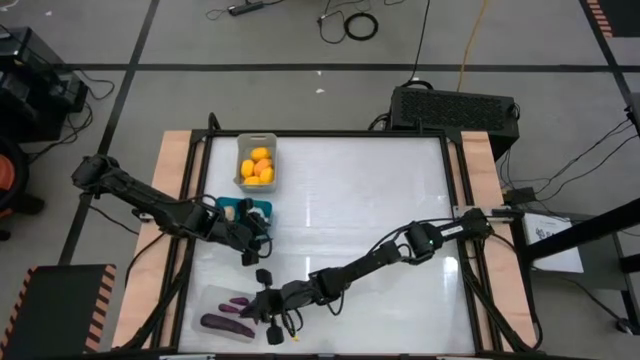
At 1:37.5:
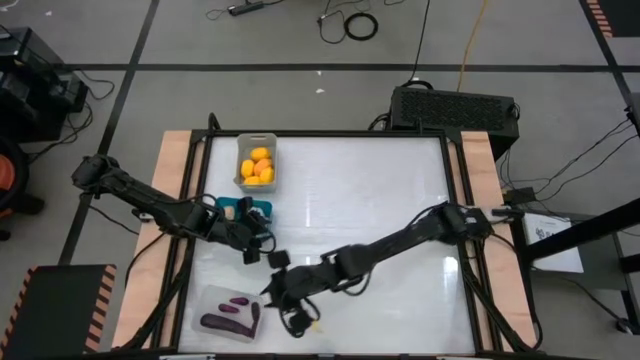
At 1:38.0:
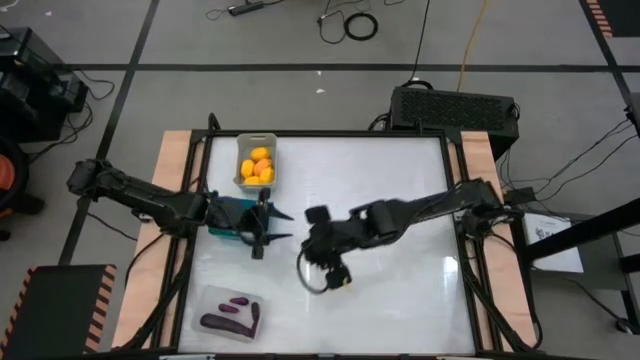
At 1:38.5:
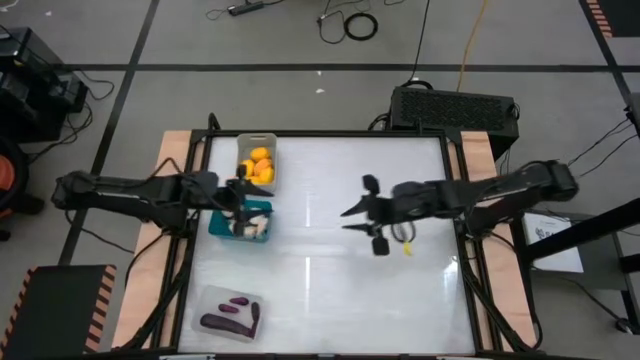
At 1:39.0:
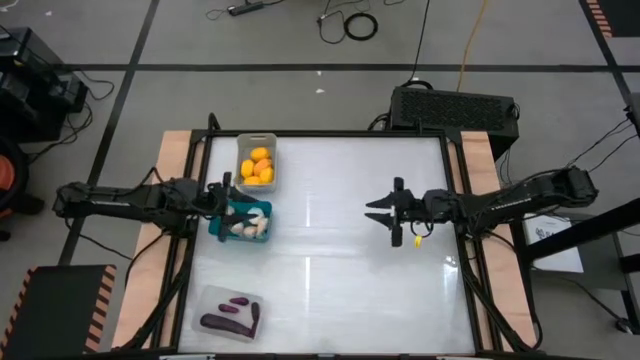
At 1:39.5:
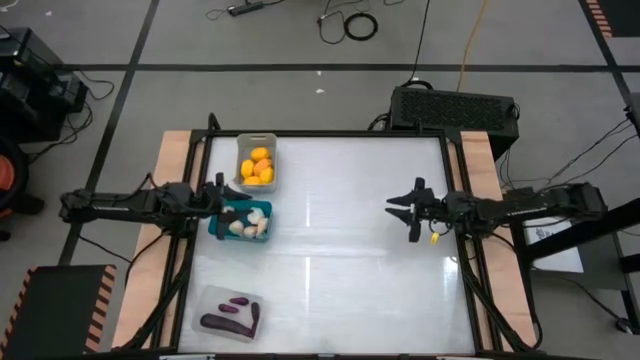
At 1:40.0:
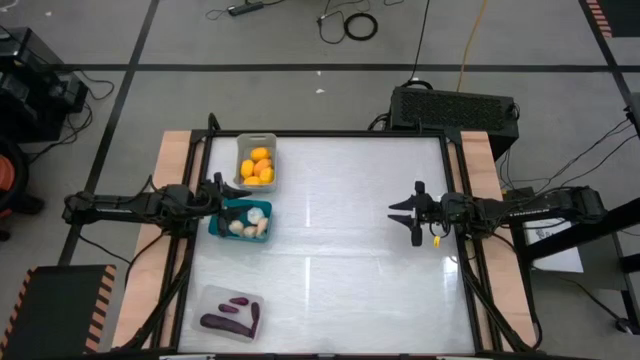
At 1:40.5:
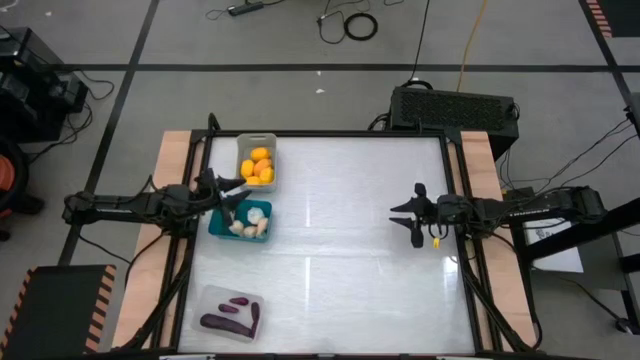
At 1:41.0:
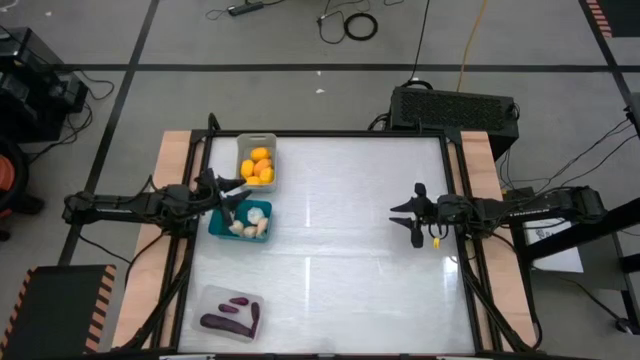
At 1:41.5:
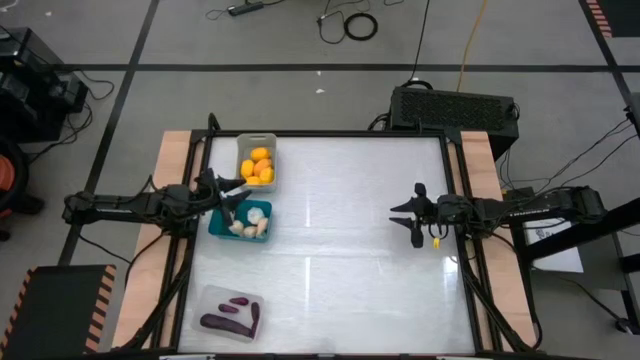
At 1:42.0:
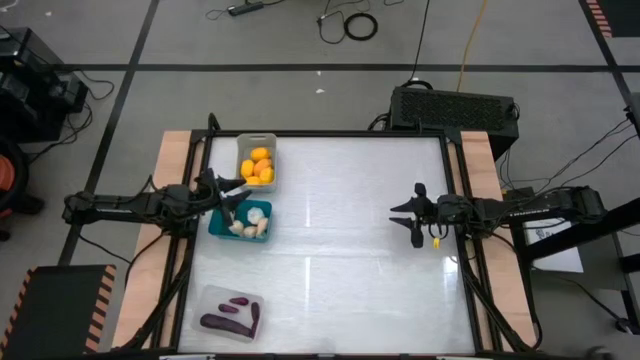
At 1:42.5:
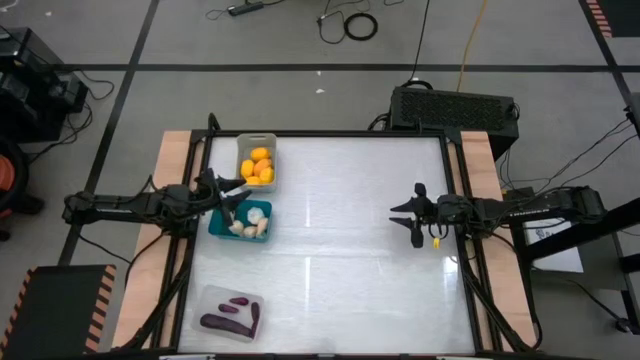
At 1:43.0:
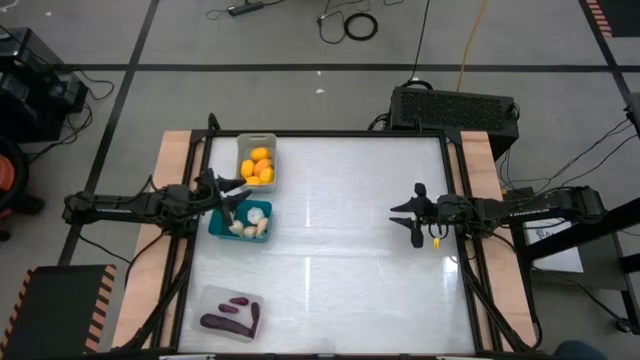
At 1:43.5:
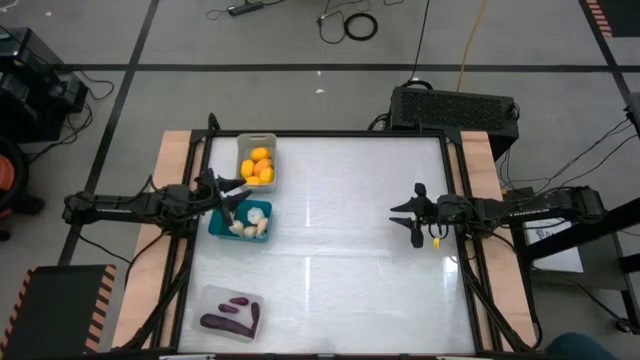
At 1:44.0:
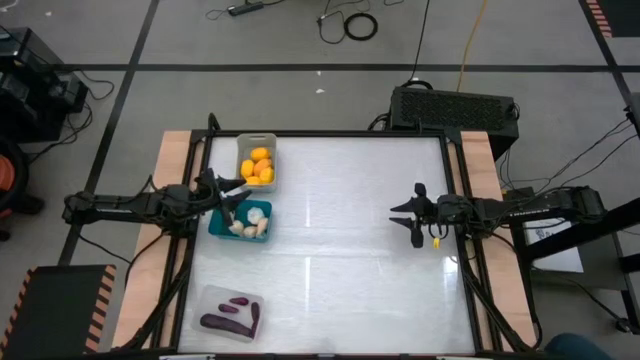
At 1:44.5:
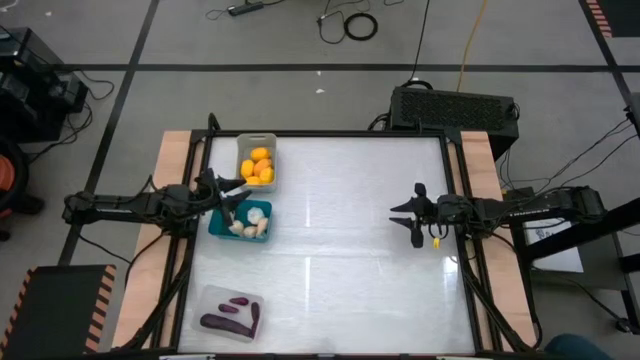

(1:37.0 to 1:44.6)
Task: Sort produce into baskets
Return to Home Position

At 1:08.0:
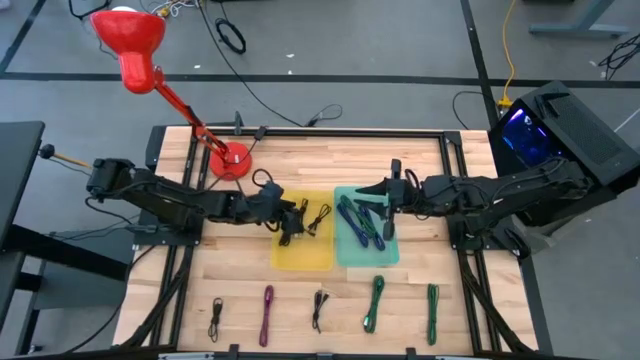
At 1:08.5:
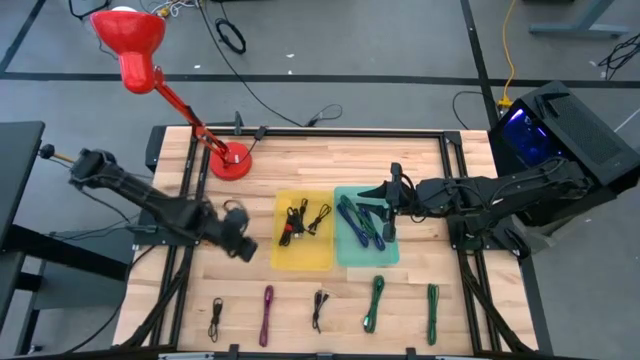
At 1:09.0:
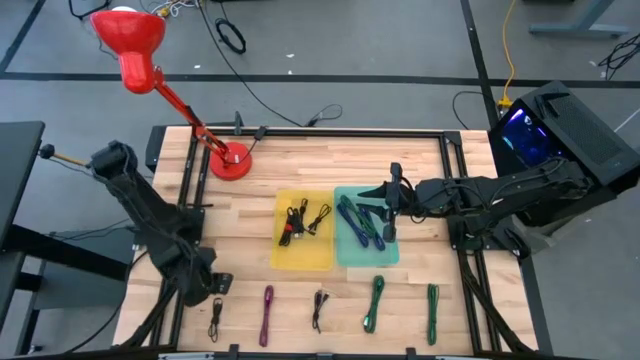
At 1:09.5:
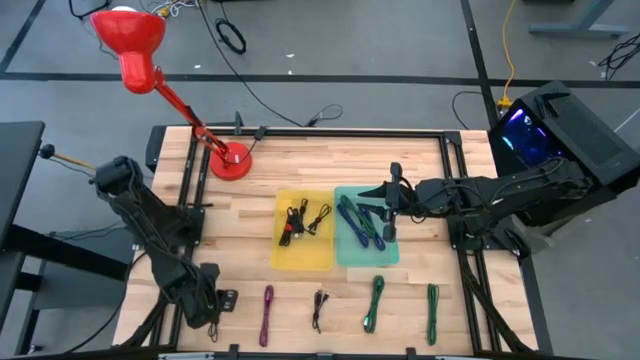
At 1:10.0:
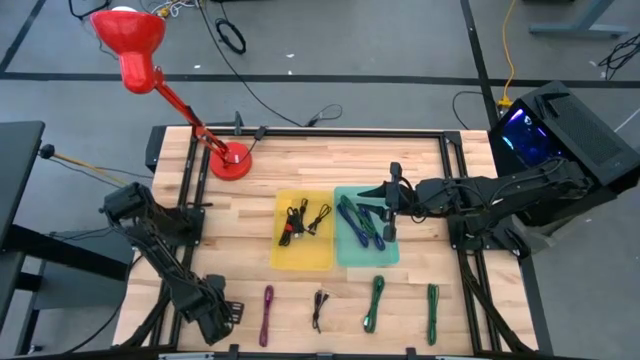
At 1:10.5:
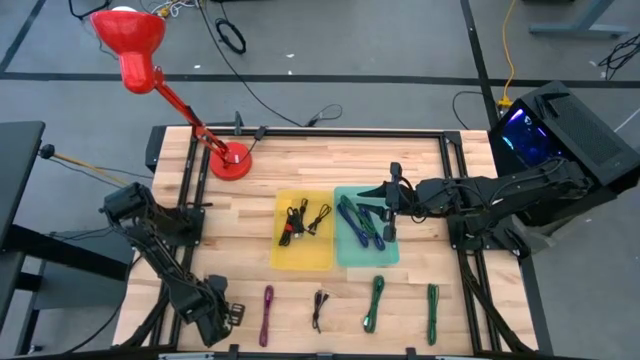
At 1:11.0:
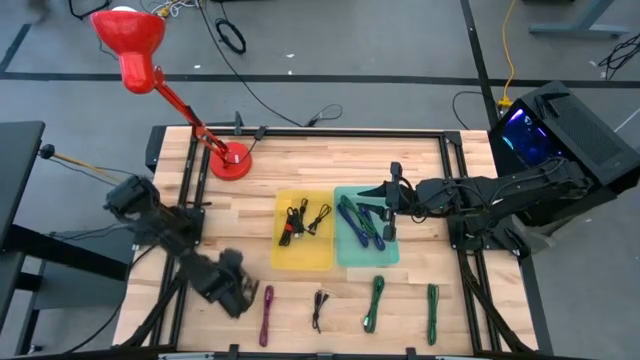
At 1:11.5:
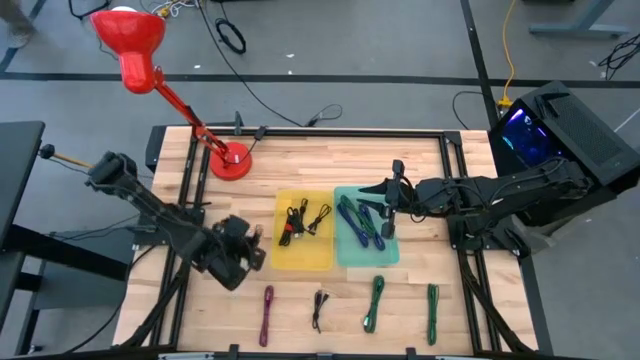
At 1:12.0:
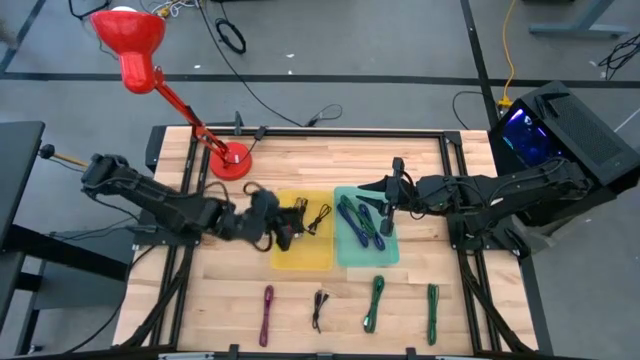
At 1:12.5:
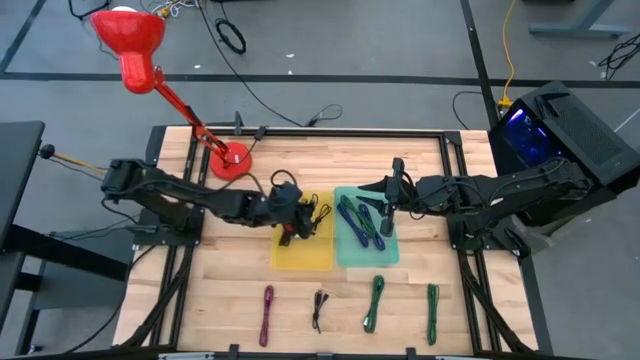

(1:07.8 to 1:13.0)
Task: Pick & Place USB Port
Put the black charger cable into the yellow bin

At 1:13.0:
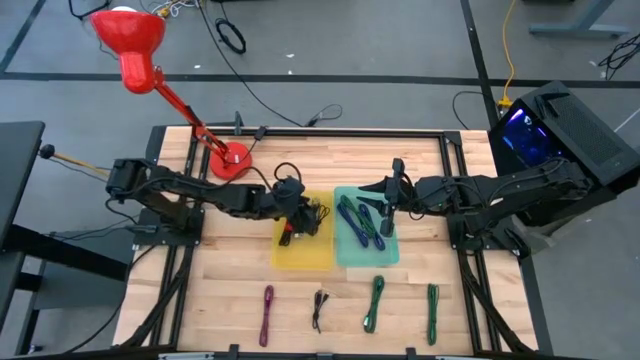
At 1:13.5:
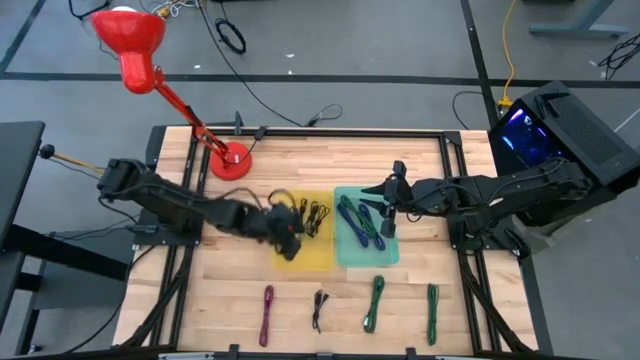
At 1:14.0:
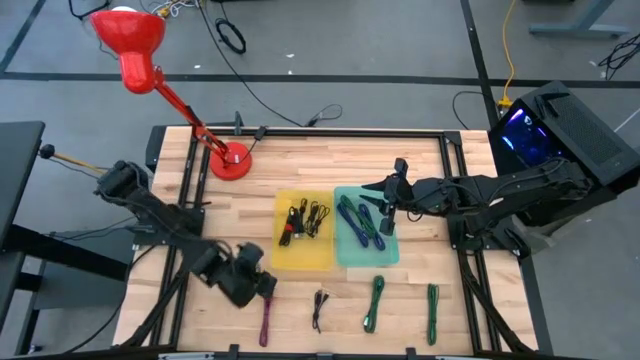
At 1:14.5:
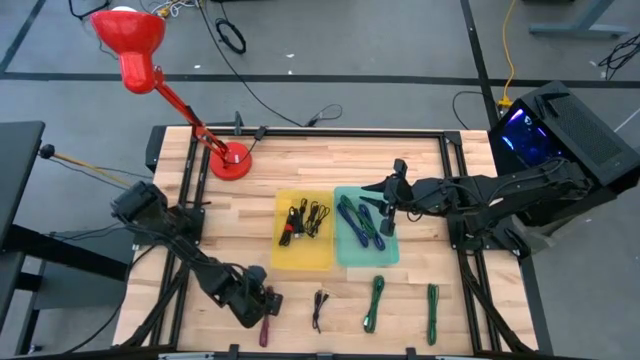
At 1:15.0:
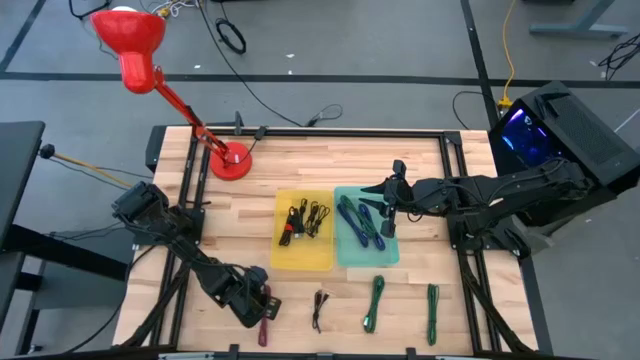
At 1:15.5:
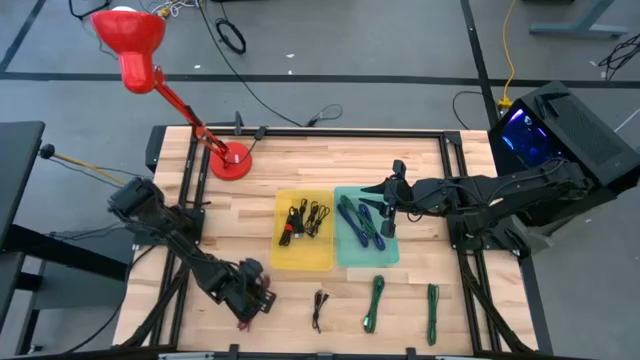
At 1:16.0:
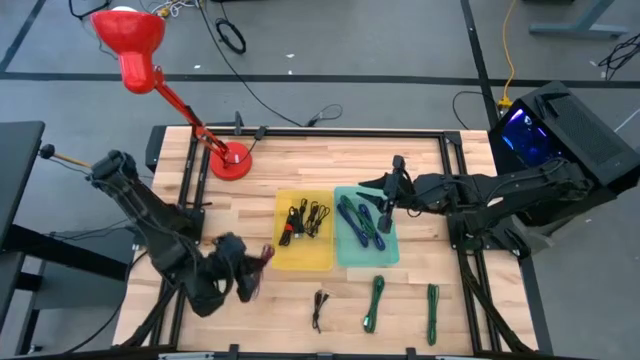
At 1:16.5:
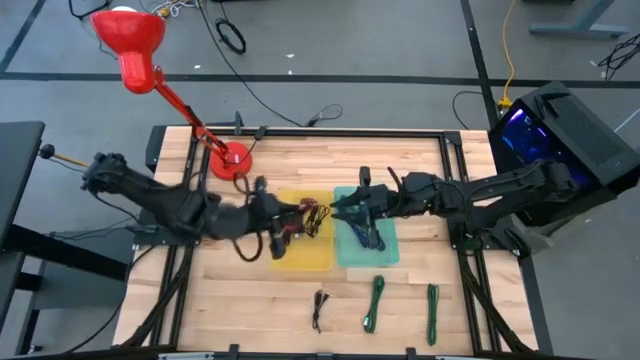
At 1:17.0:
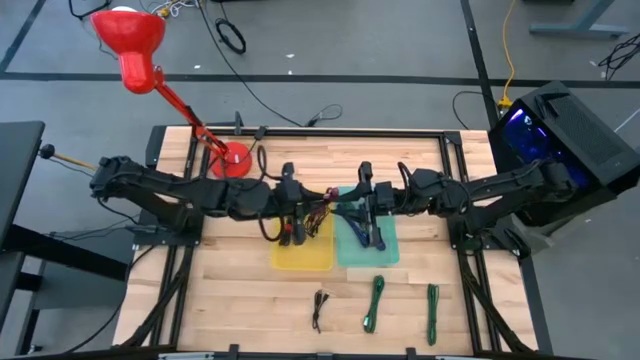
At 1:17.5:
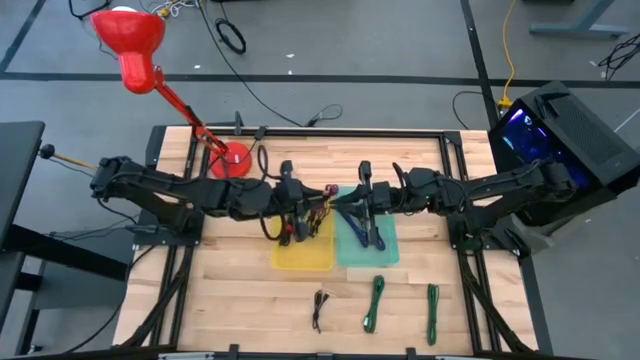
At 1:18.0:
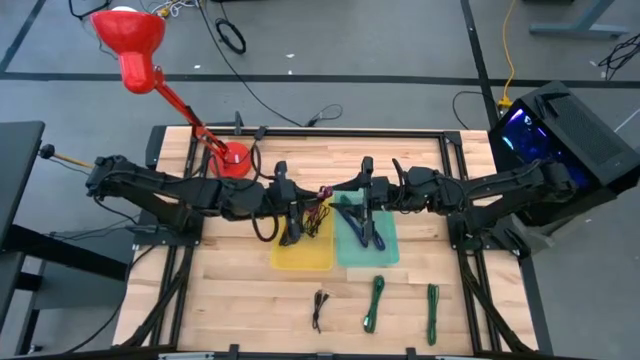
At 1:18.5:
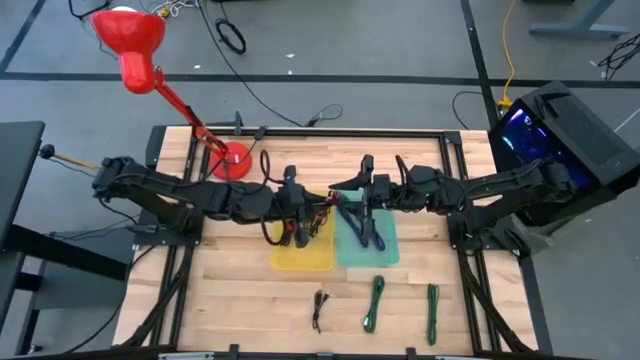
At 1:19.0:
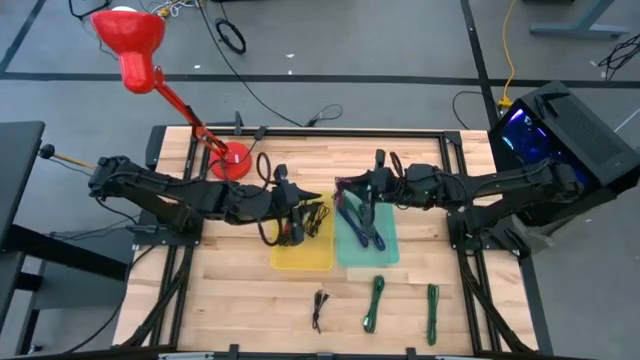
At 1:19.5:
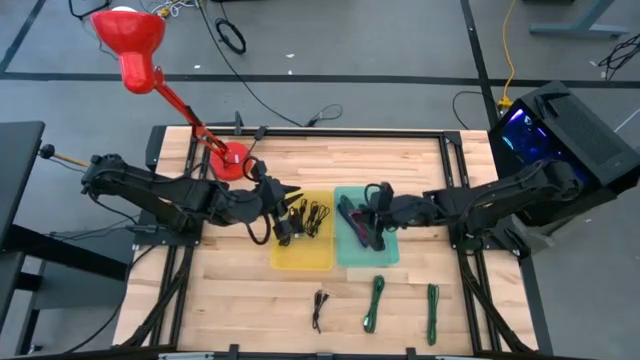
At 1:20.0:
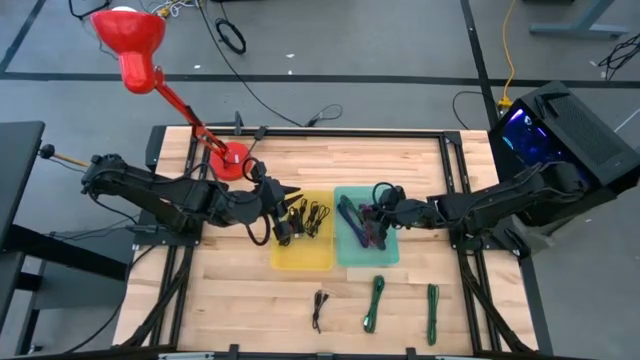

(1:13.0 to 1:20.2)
Put the pink charger cable into the green bin
